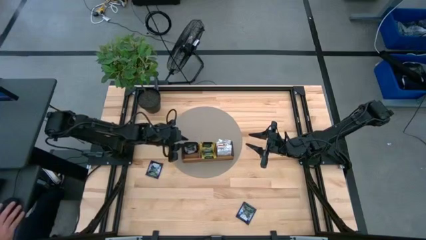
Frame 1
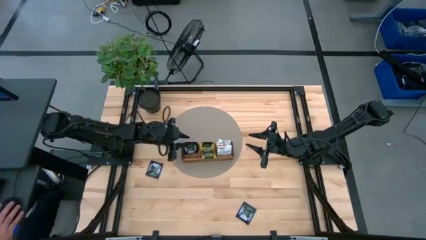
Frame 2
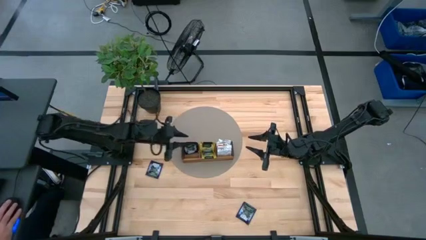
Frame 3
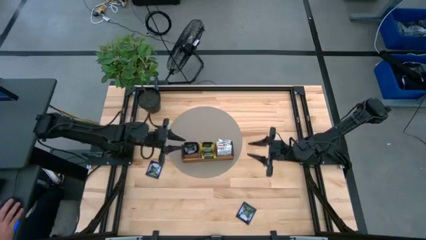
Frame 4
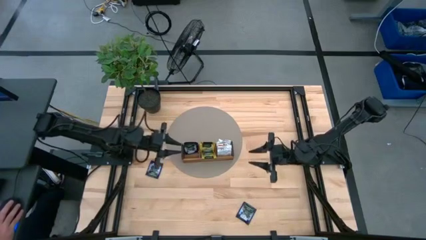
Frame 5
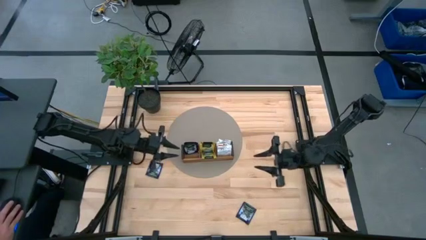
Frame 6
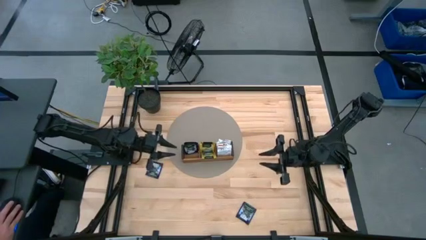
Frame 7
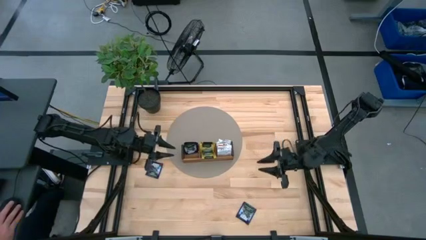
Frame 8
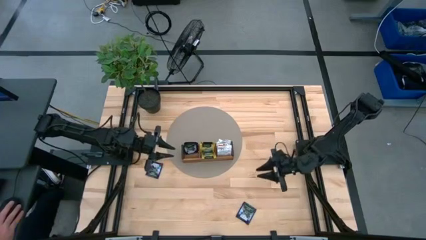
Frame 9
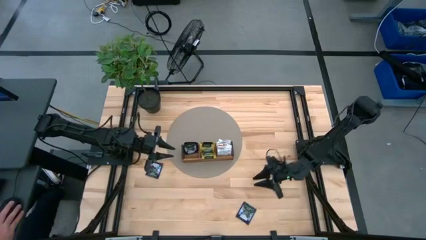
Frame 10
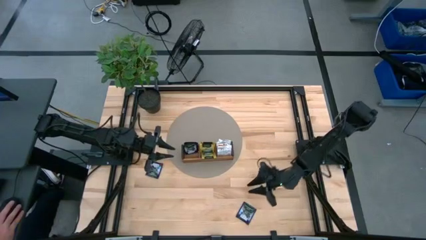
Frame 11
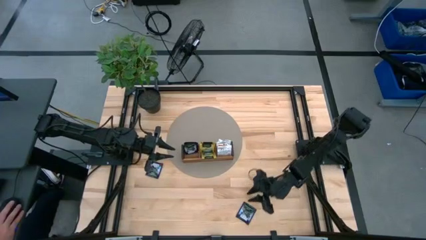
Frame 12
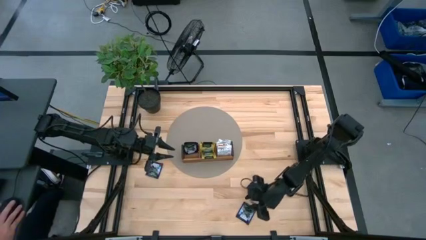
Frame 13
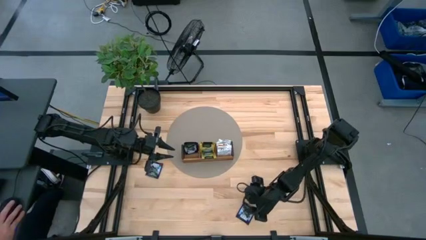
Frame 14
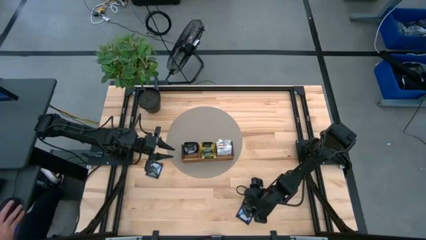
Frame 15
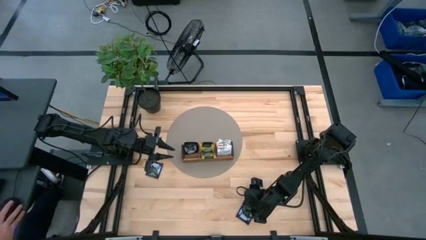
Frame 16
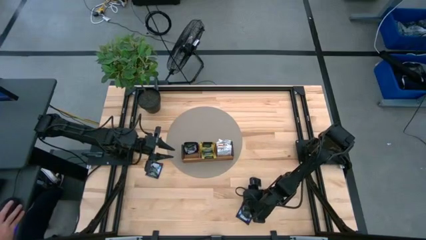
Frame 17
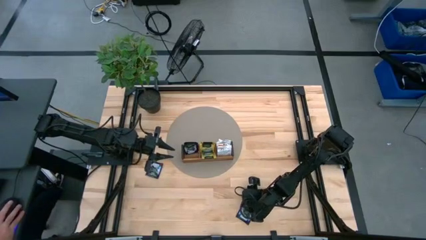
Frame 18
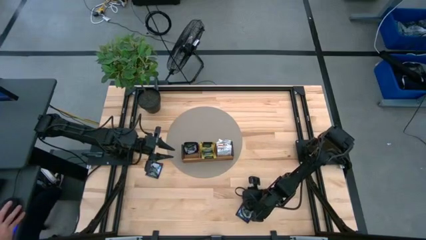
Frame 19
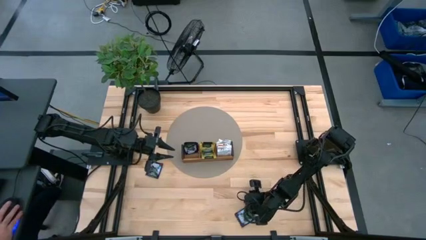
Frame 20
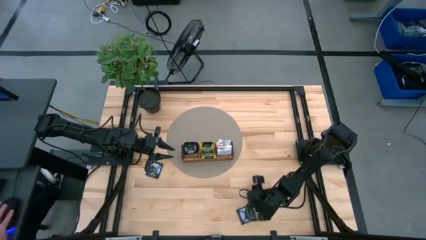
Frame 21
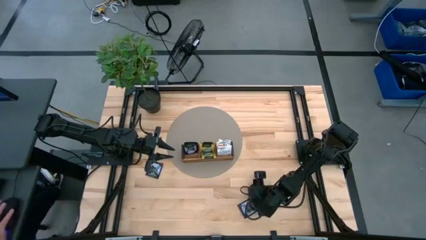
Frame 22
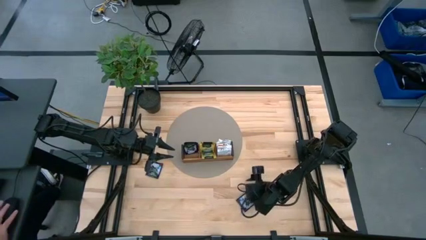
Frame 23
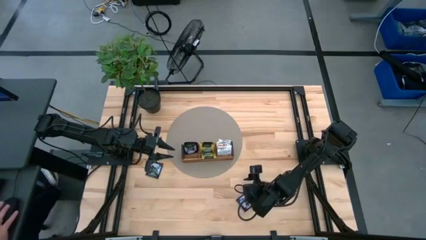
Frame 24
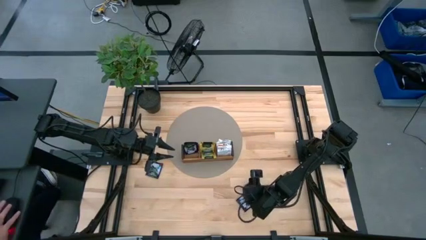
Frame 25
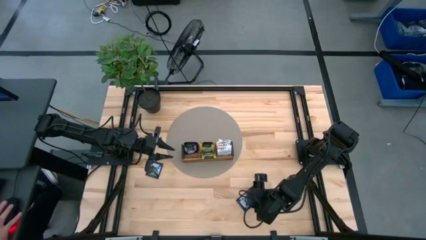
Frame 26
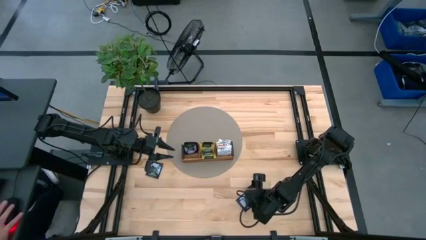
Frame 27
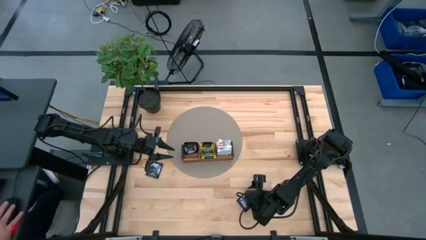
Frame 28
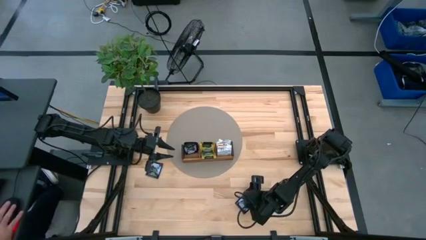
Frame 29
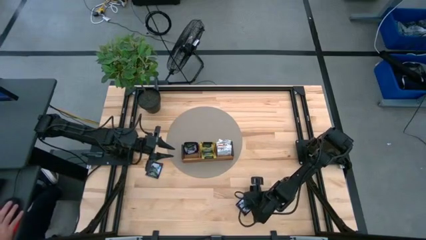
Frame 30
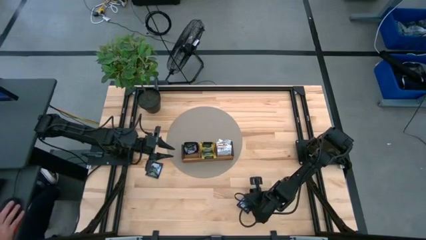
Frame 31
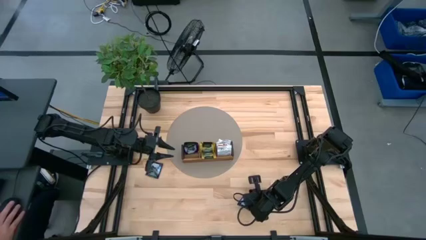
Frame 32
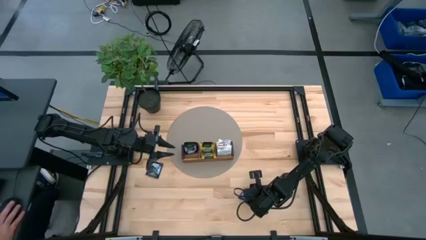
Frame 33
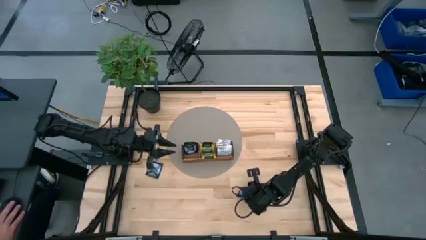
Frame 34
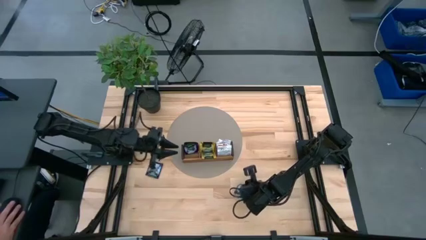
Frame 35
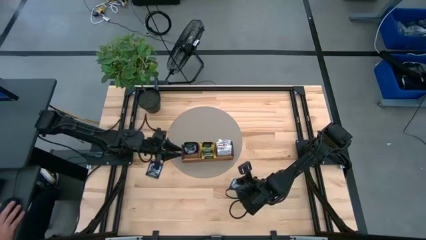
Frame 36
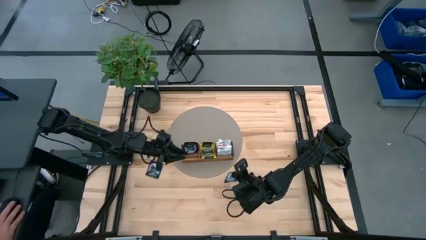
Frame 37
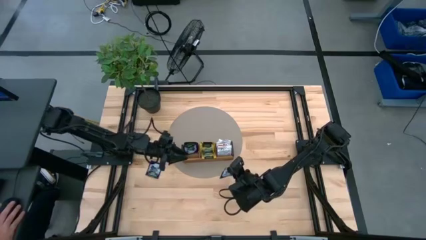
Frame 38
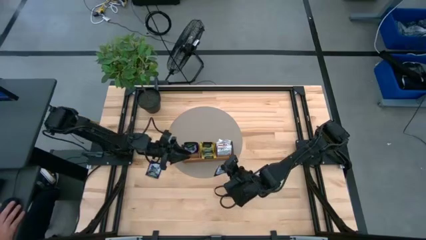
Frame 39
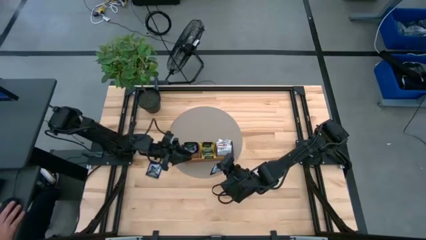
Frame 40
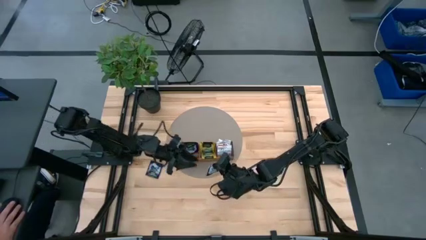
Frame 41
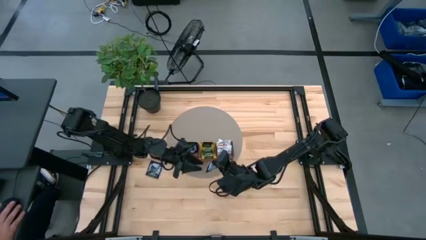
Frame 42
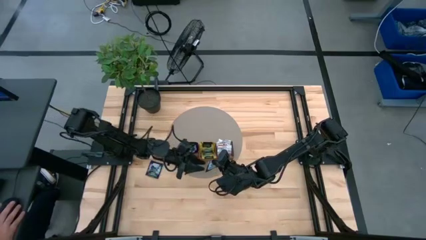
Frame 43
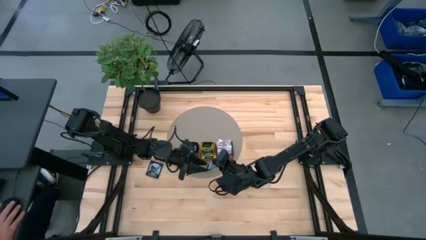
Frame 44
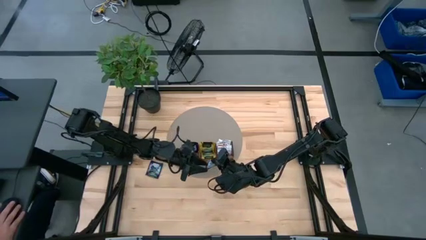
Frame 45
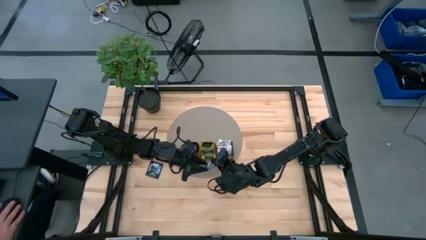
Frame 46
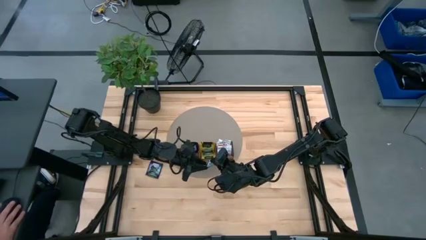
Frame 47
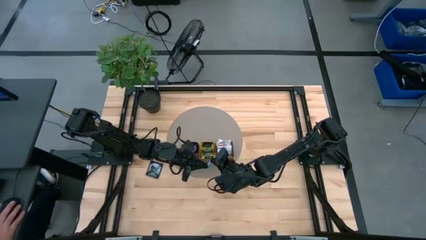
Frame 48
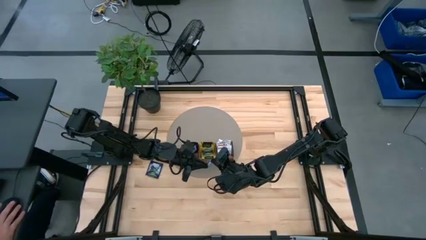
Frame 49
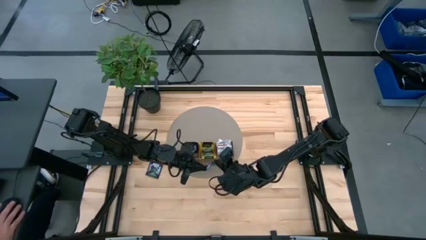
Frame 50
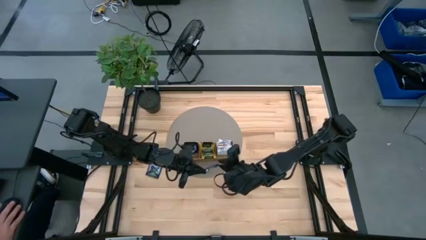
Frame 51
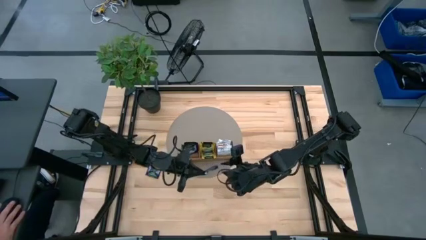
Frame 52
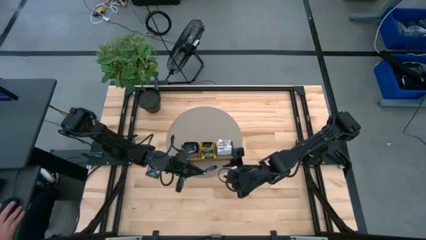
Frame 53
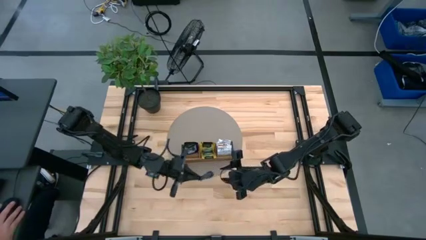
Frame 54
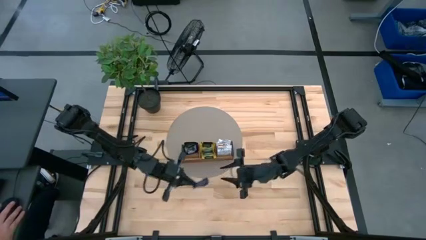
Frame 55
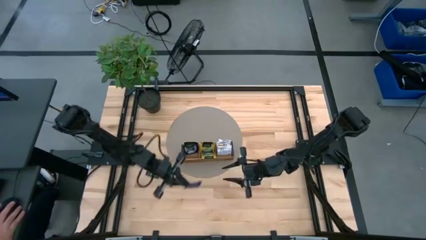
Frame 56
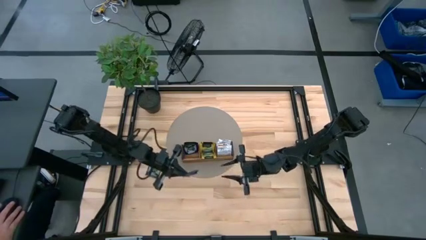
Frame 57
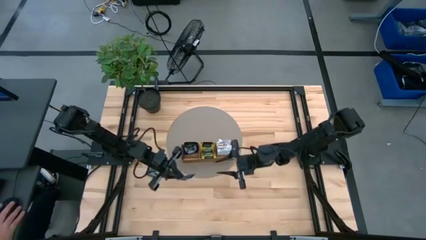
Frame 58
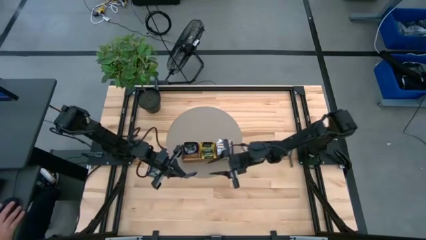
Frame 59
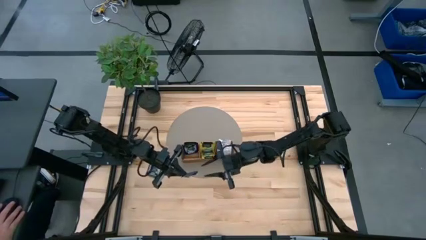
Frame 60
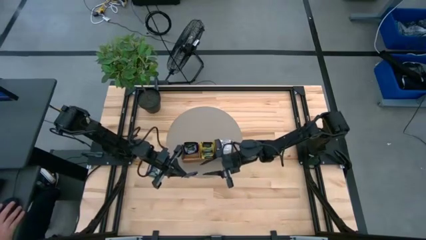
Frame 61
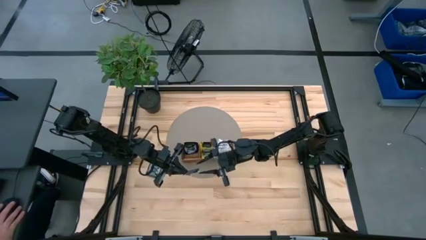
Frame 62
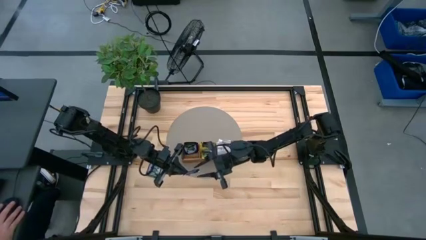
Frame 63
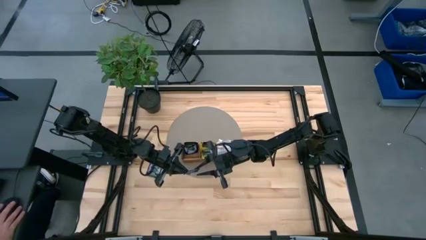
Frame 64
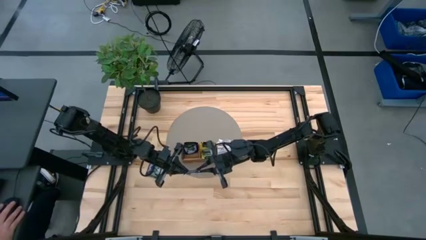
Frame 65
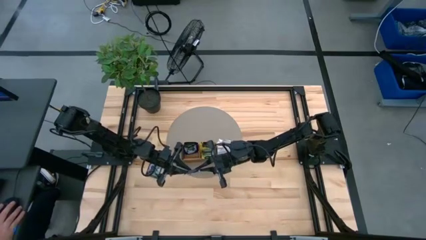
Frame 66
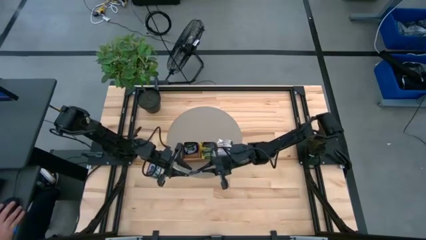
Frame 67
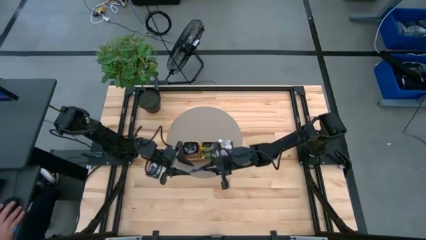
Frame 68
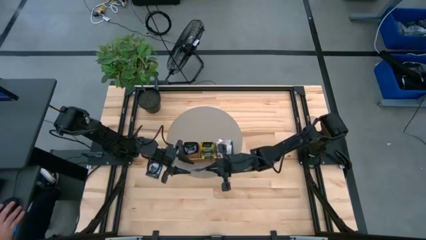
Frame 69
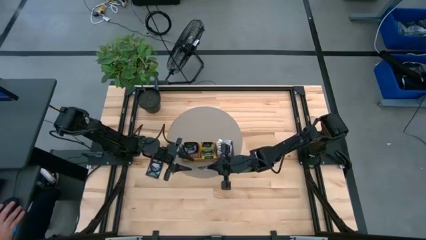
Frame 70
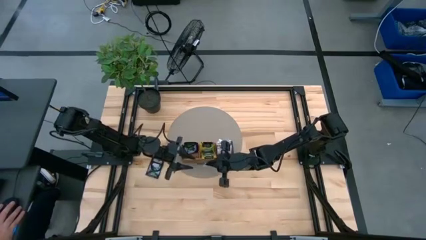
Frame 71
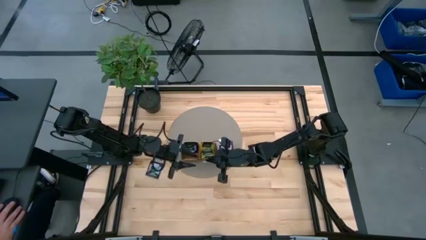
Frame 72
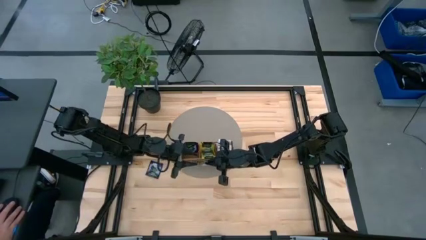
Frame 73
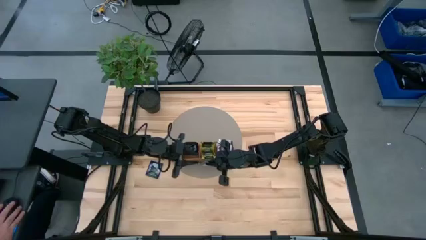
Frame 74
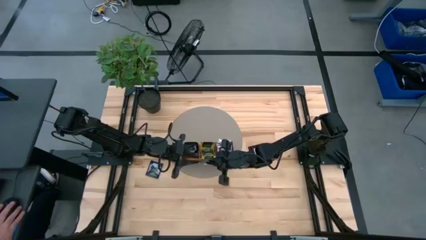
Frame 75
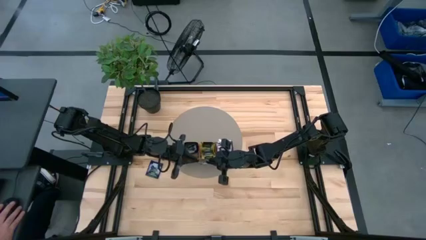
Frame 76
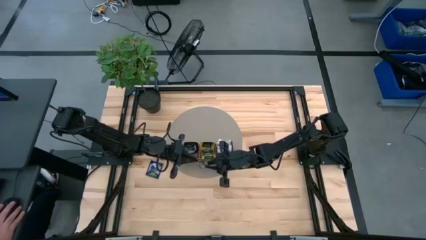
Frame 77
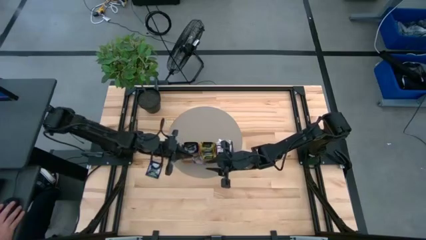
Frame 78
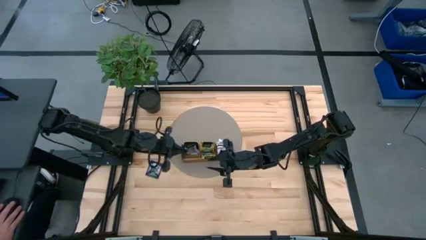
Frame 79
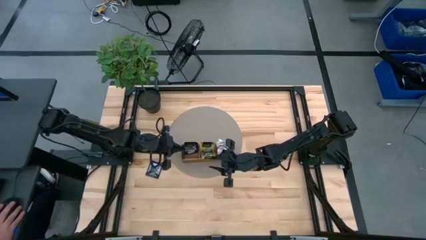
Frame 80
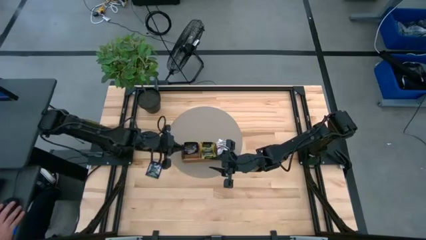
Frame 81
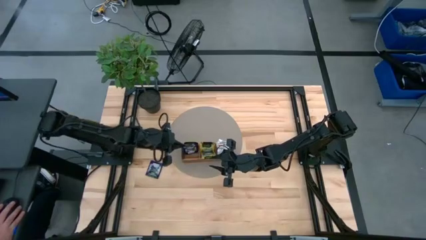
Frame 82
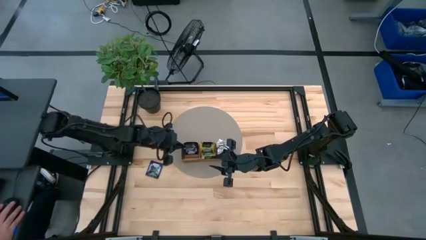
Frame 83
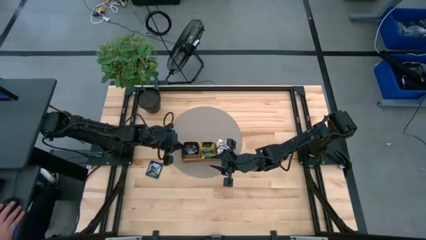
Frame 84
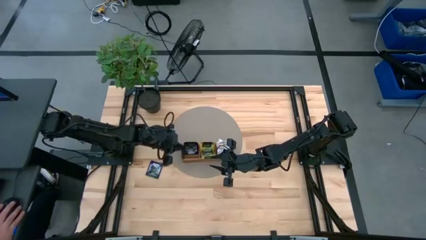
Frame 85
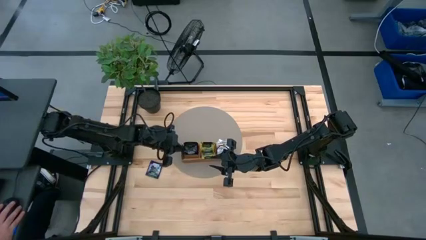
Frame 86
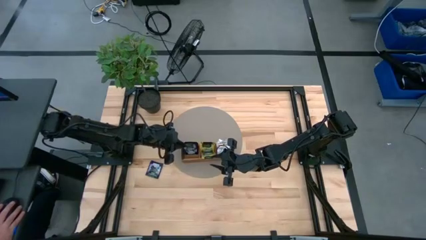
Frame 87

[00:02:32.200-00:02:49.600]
Task: Pick & Place Tea
Put the purple tea bag into the left section of the wooden organizer
